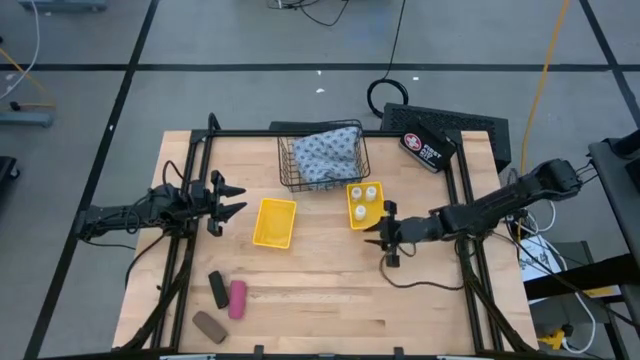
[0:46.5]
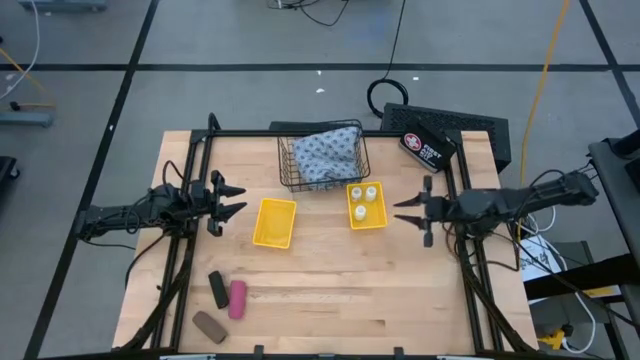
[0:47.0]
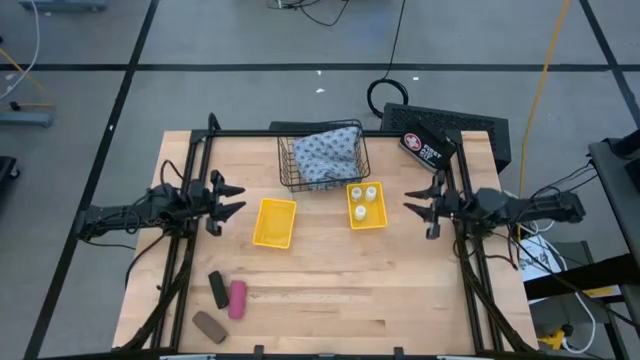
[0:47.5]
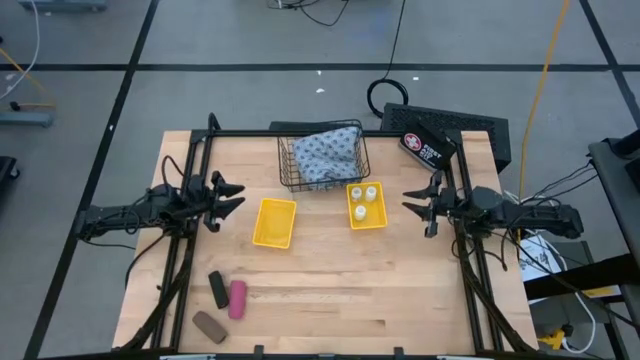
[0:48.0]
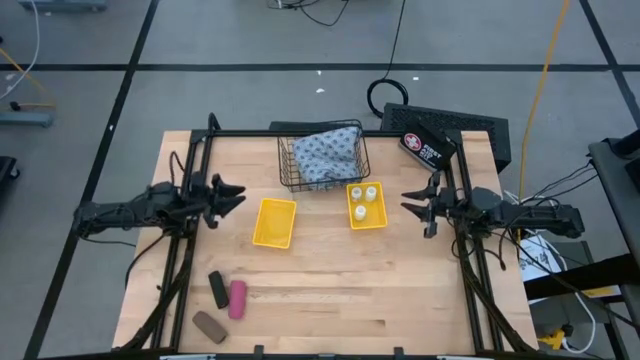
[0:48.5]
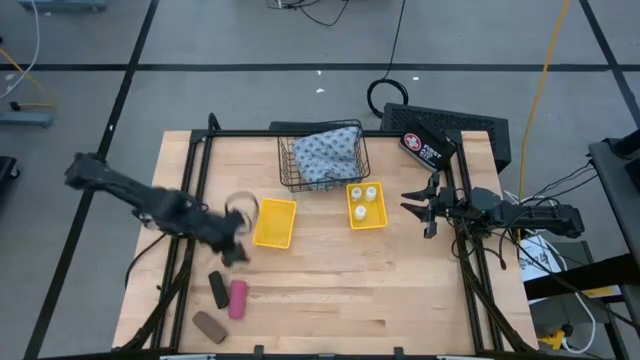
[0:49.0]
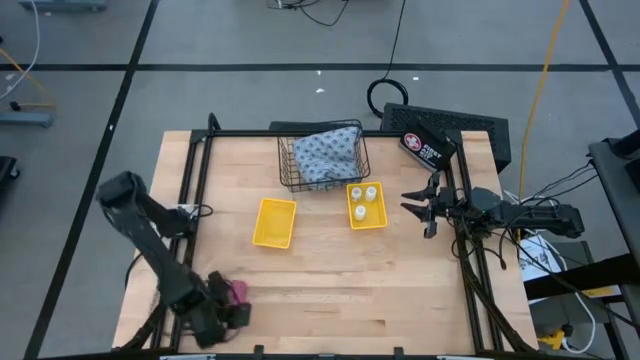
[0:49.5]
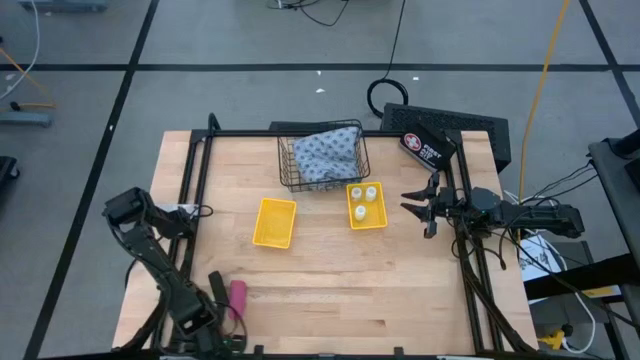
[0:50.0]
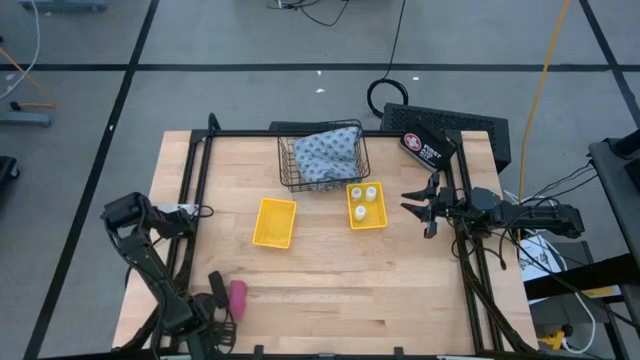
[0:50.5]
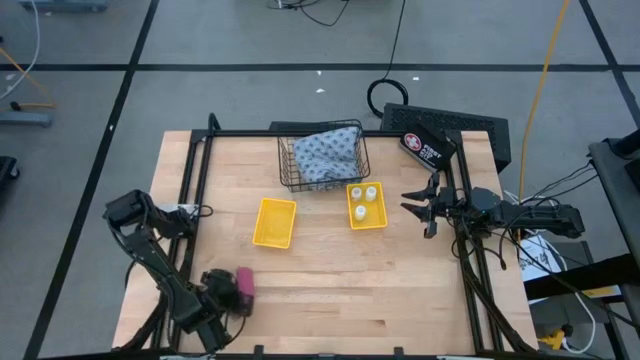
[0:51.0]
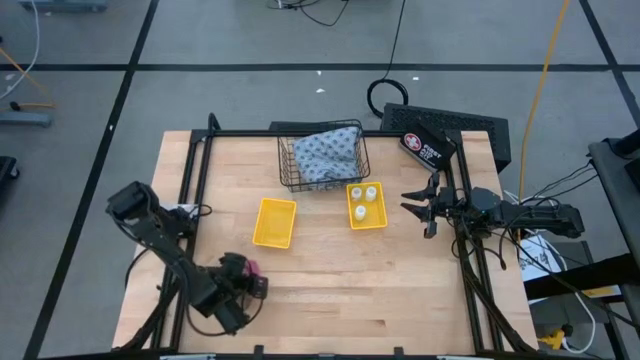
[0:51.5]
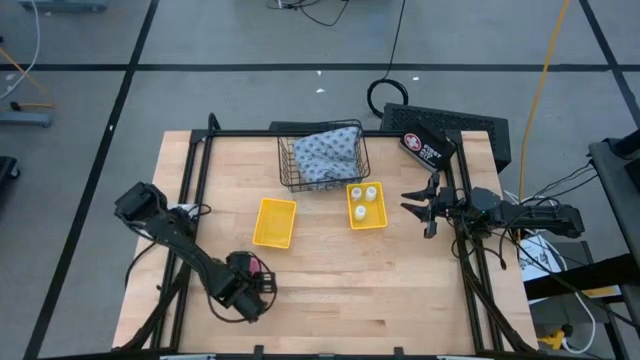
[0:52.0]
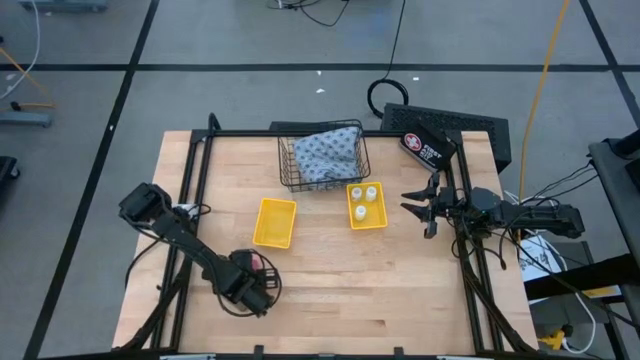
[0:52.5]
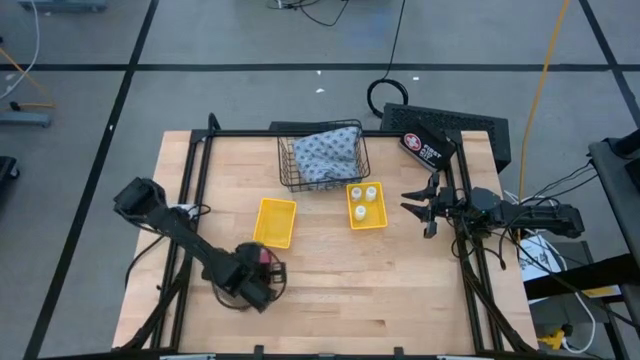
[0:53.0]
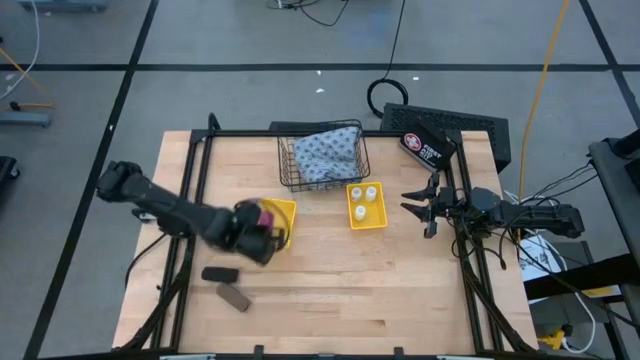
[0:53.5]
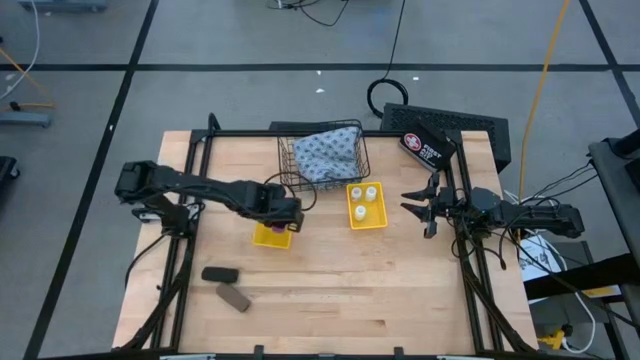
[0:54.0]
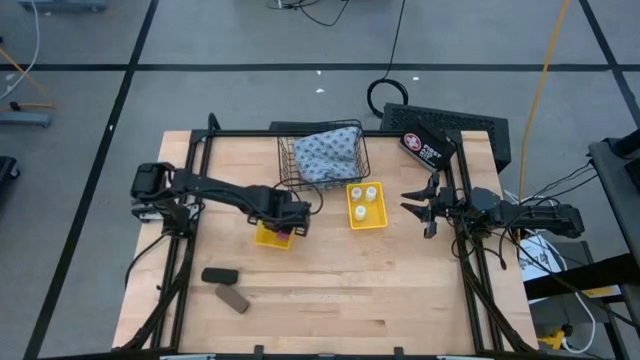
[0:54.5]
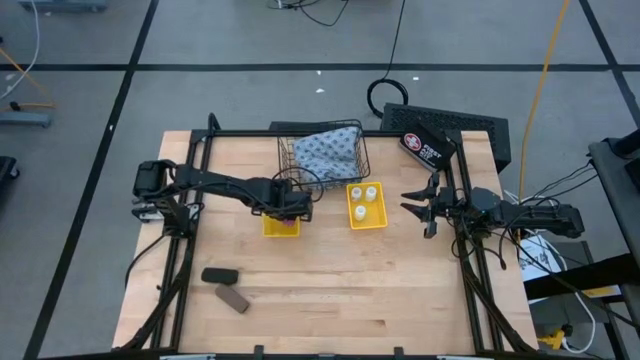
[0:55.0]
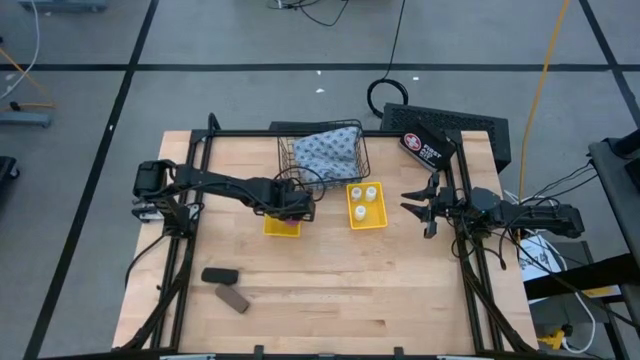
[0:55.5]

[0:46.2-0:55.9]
Task: Pick & Place Medicine items
Put the pink bandage into the left yellow basket

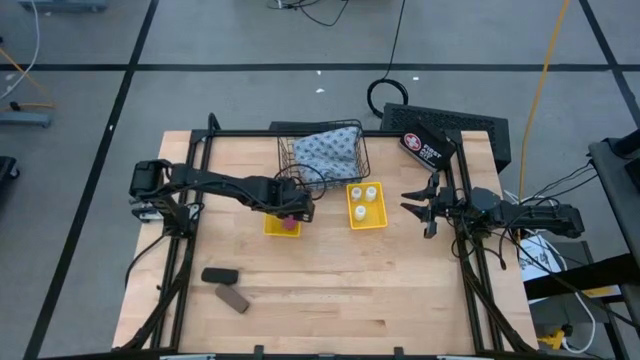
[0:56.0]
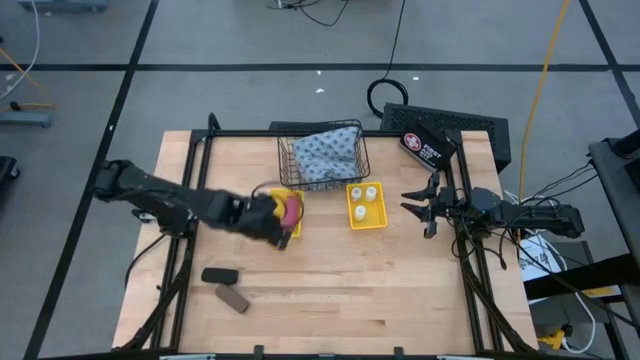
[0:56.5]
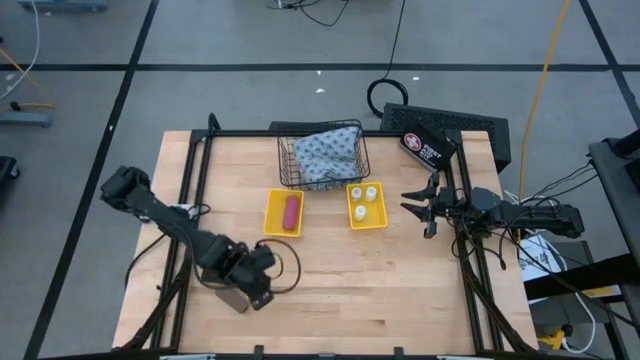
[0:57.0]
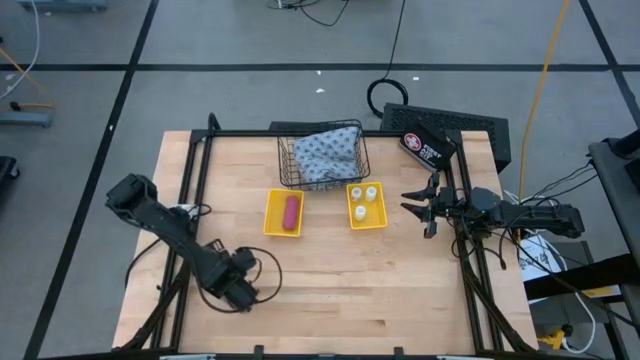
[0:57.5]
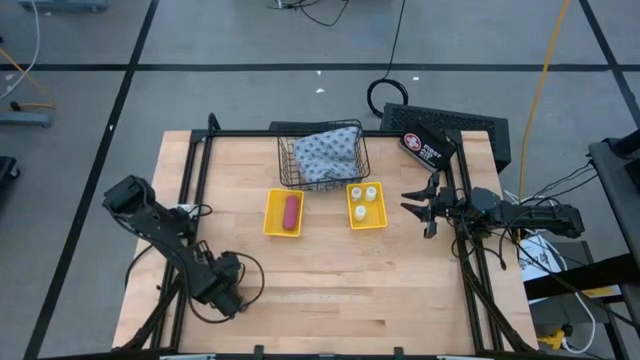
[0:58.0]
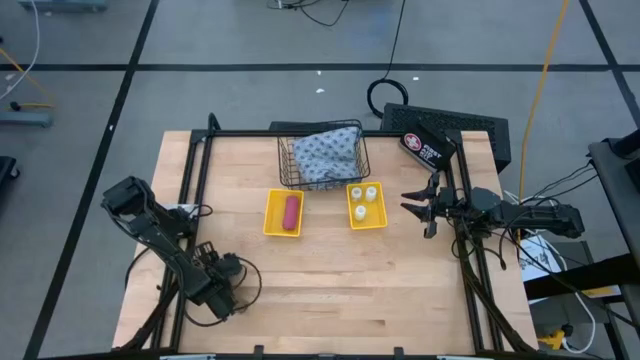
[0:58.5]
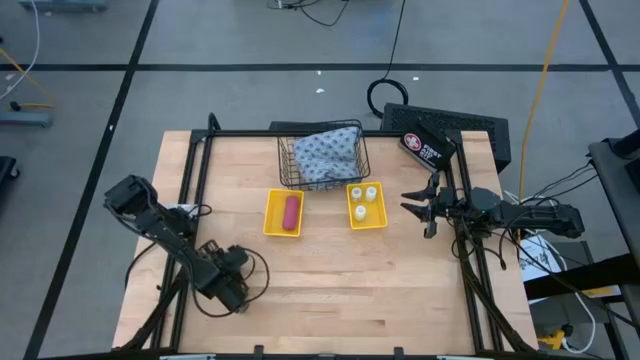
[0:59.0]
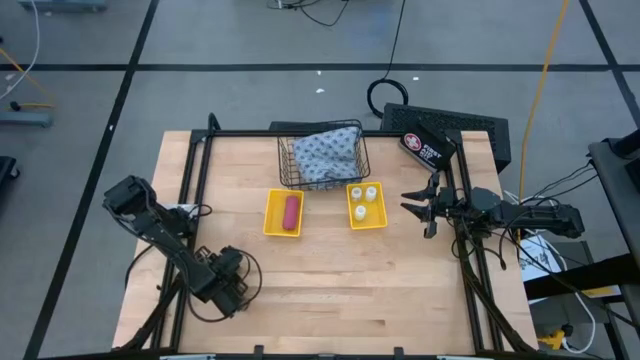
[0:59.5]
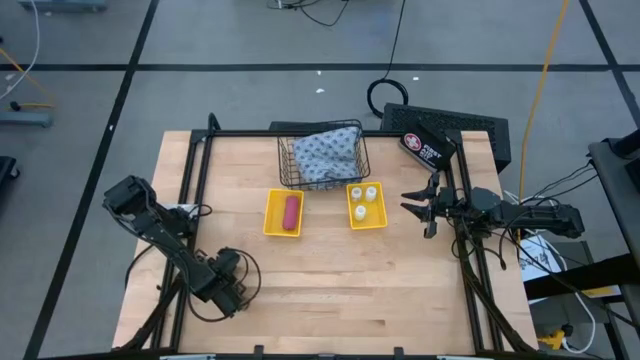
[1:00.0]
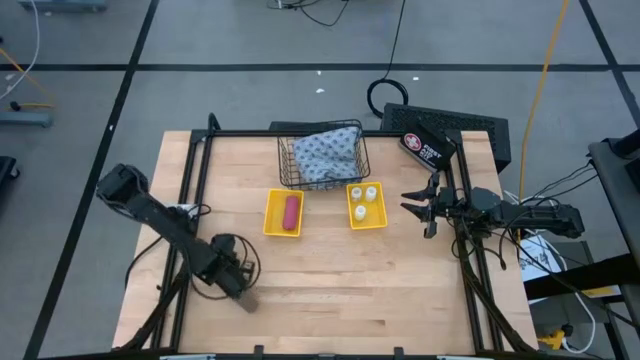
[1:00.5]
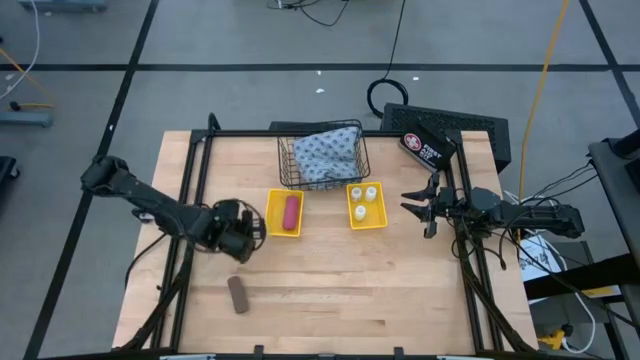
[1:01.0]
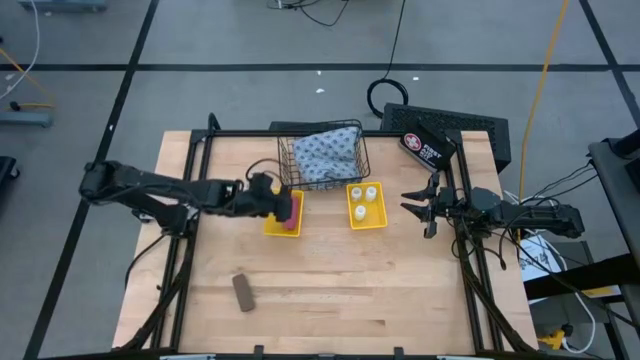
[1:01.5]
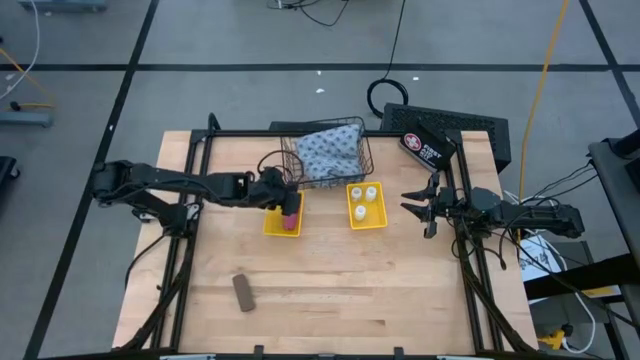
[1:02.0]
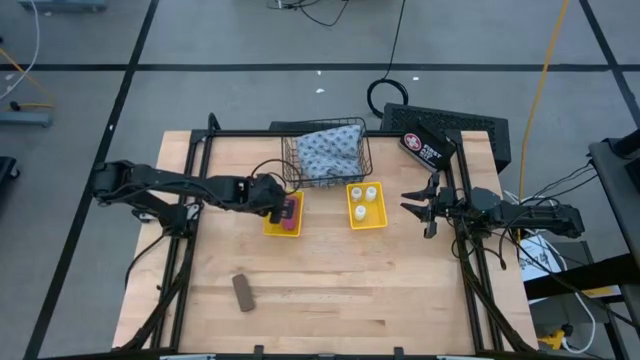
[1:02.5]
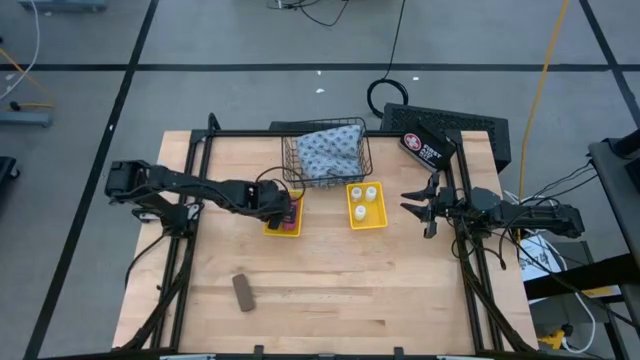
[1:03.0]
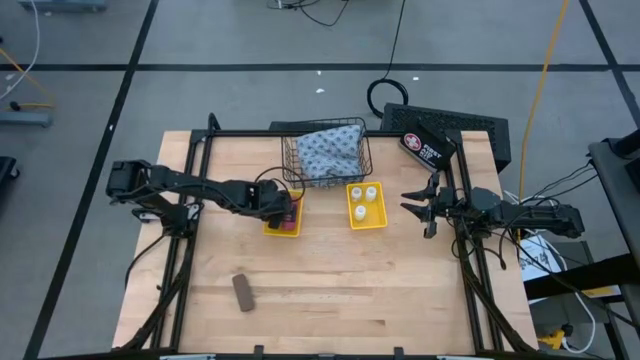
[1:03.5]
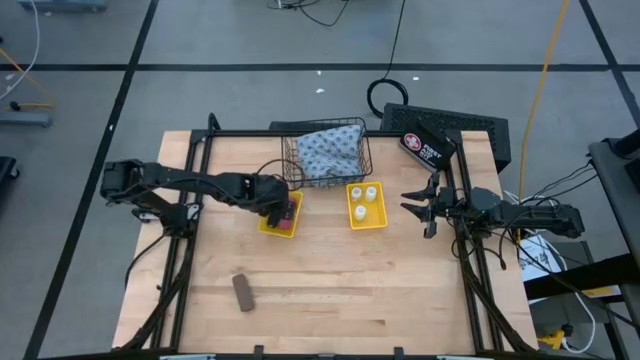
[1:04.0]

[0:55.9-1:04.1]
Put the black bandage into the left yellow basket

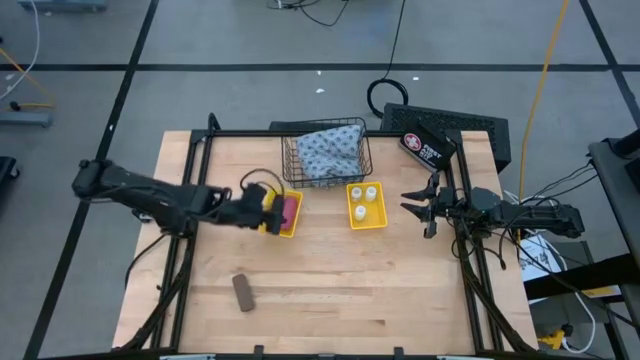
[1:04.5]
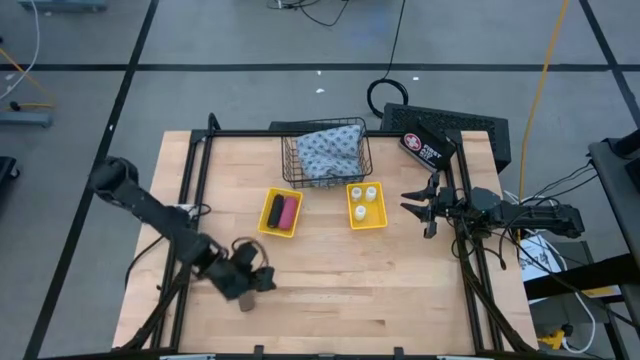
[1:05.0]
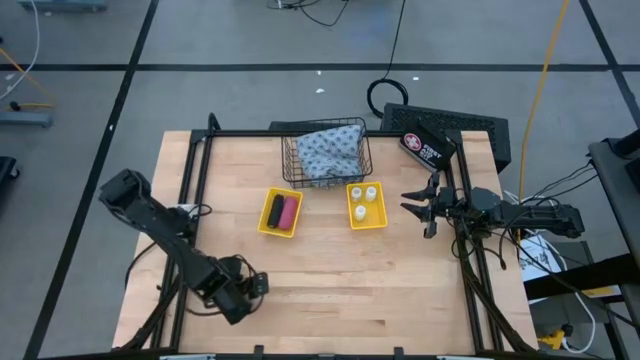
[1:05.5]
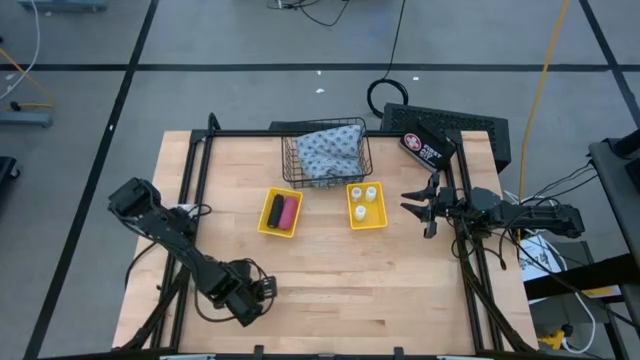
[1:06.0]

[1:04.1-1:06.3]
Put the brown bandage into the left yellow basket
